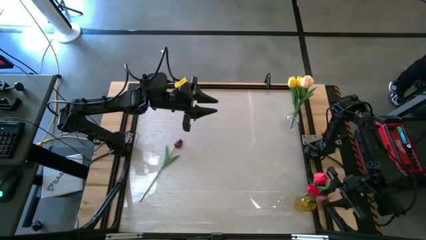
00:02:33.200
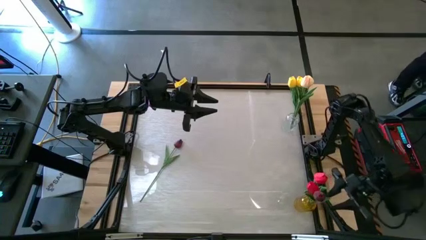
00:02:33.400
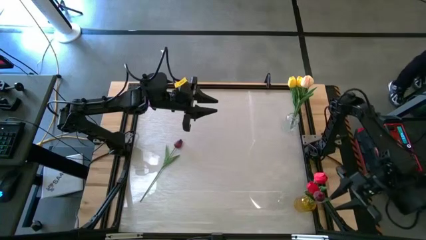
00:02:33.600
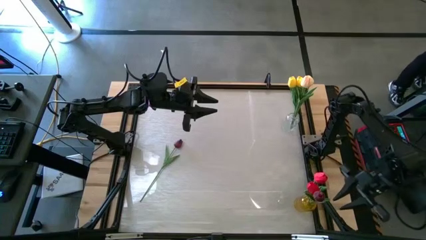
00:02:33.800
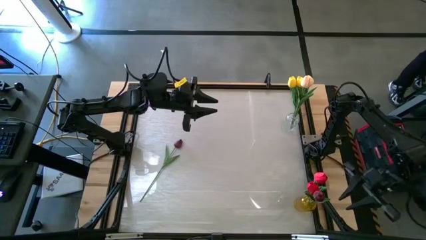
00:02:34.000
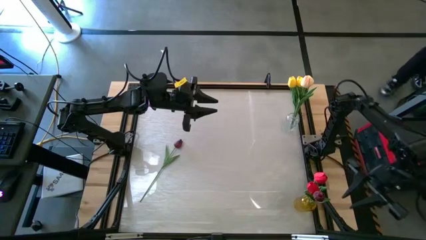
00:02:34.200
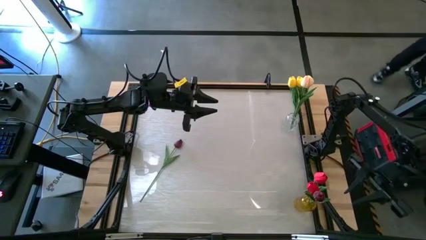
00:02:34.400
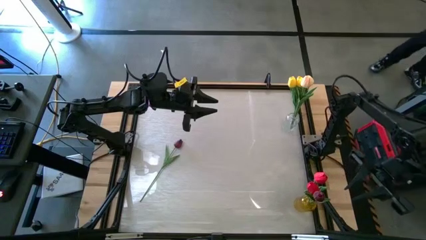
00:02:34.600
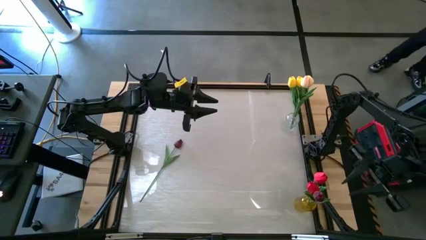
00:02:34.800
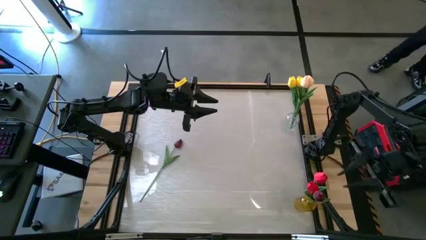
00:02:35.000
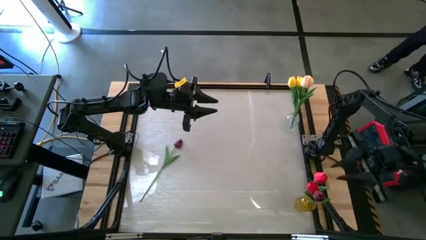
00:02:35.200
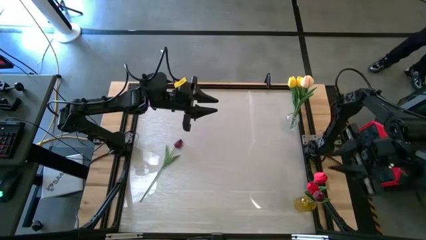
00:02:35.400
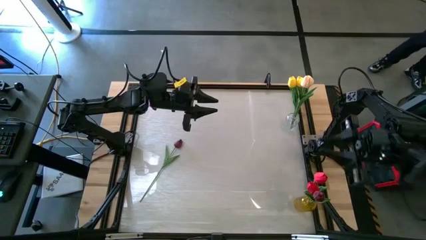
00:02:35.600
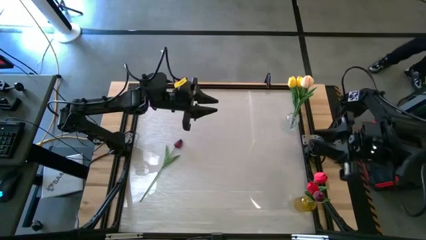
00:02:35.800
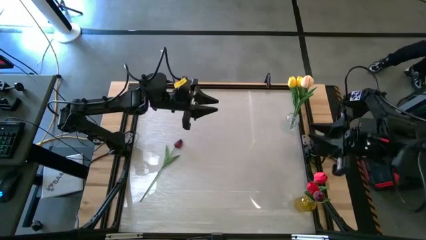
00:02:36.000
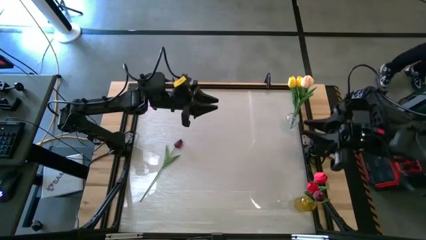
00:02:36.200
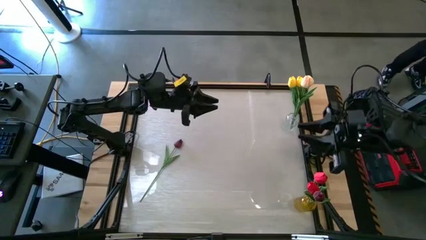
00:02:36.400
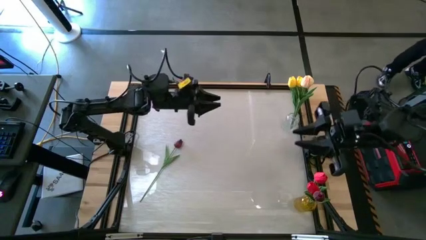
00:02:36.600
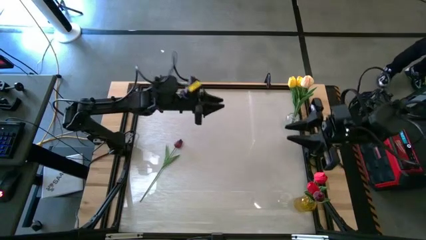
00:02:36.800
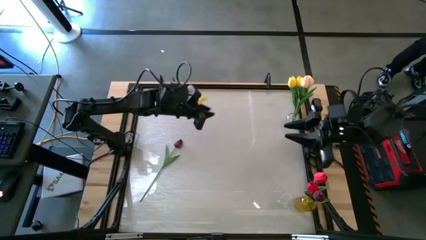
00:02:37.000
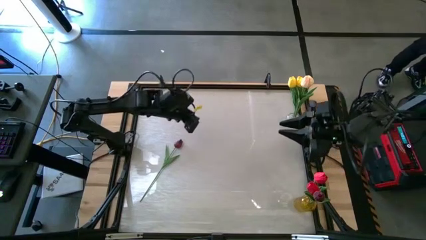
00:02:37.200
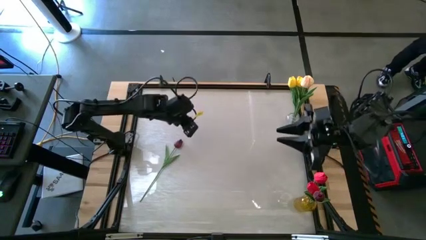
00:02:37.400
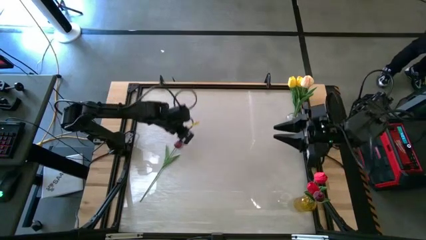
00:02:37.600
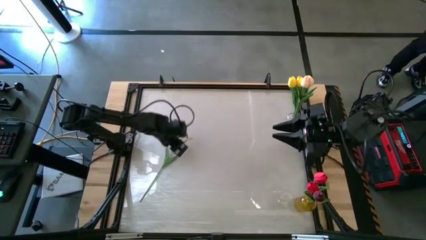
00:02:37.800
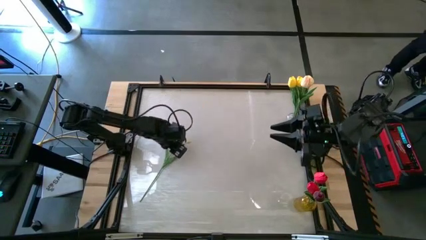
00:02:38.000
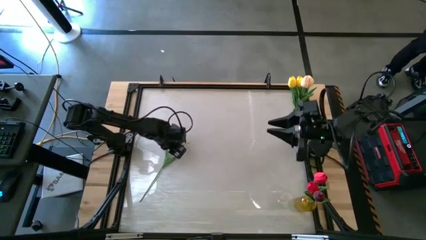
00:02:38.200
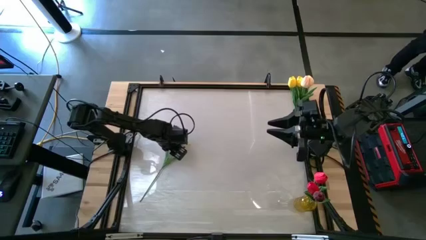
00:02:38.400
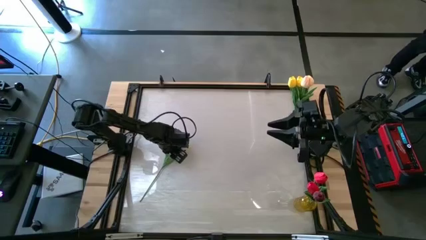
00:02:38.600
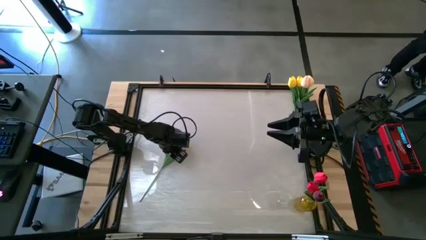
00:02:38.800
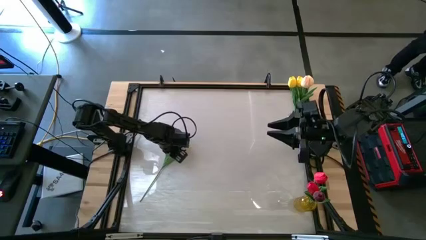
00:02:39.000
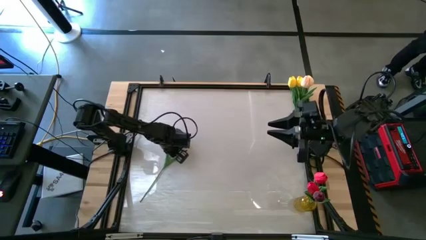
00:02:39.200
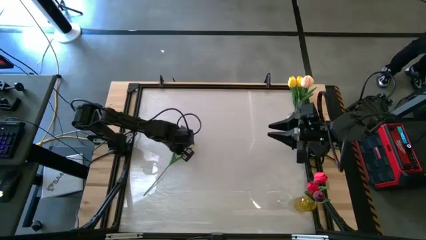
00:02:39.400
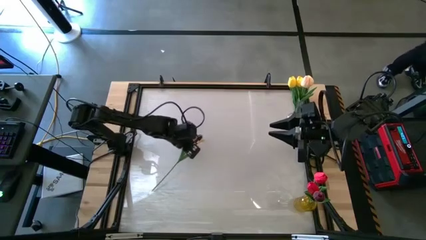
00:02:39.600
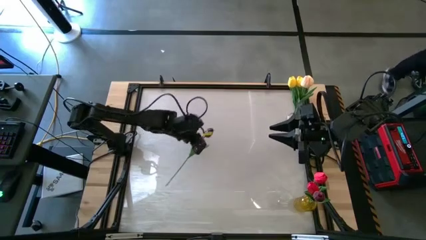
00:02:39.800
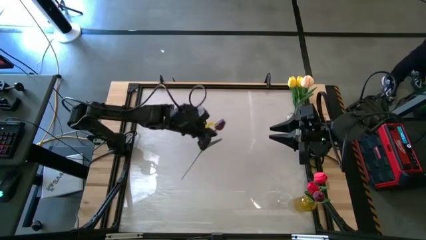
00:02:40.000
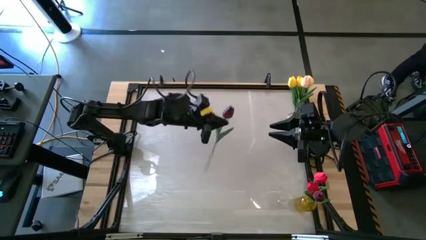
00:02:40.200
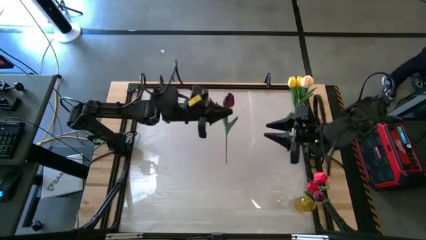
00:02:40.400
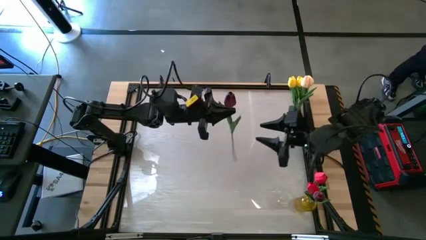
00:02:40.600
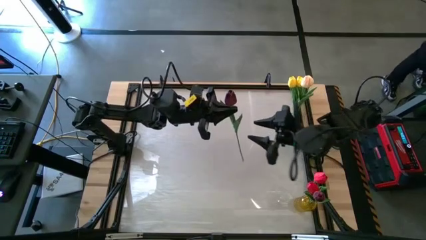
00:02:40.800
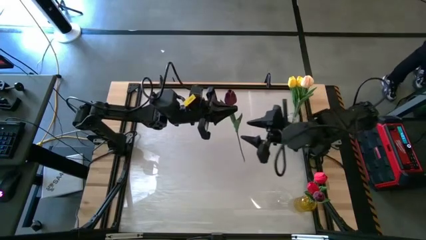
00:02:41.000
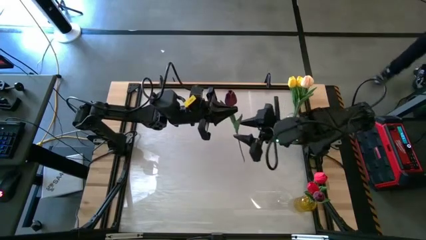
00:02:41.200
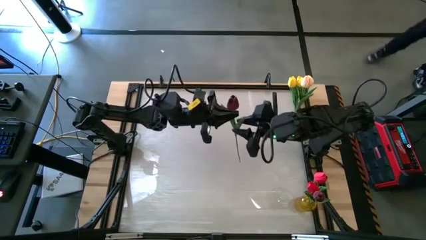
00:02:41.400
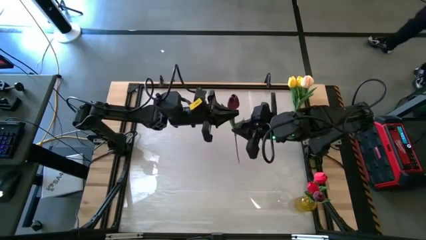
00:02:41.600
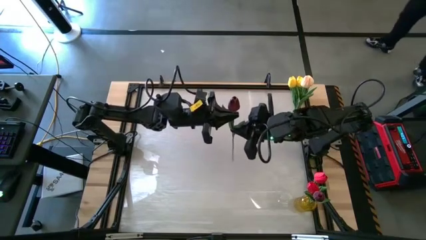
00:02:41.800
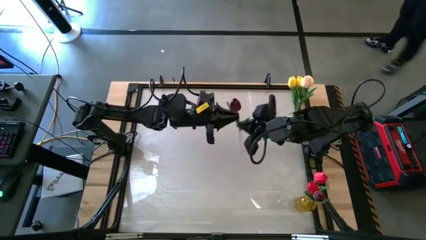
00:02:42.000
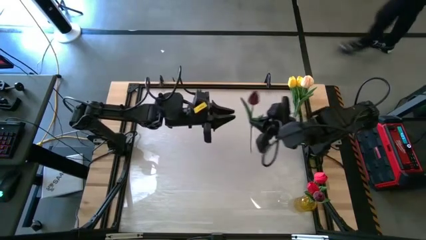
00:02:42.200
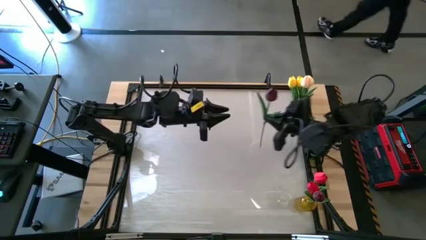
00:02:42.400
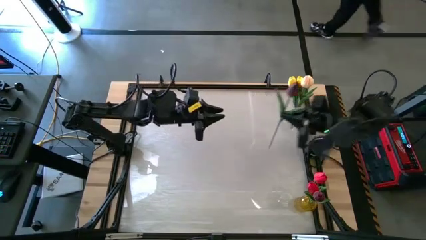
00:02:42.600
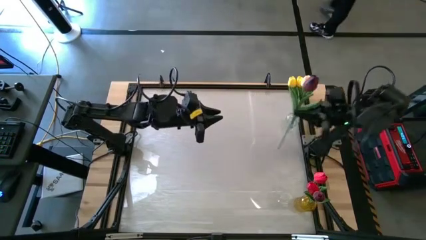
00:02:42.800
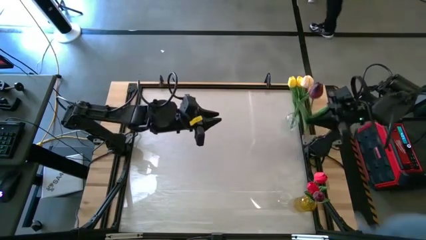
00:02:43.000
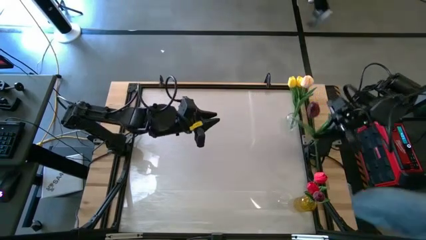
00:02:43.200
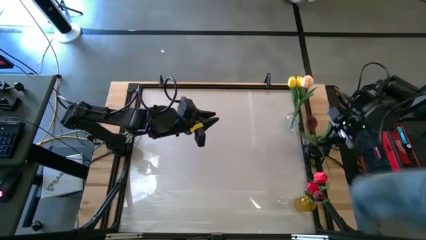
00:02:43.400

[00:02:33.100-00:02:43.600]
Task: Sort flowers into vase by color
Put the dark red tulip into the yellow vase
